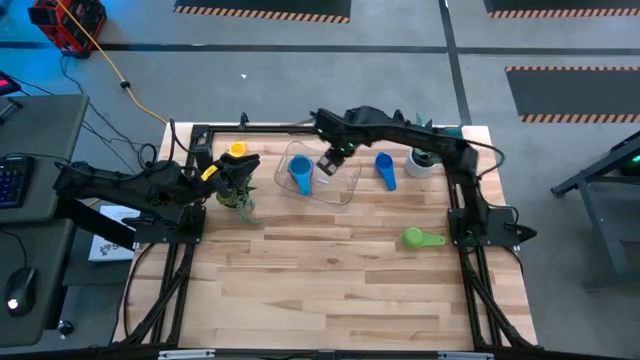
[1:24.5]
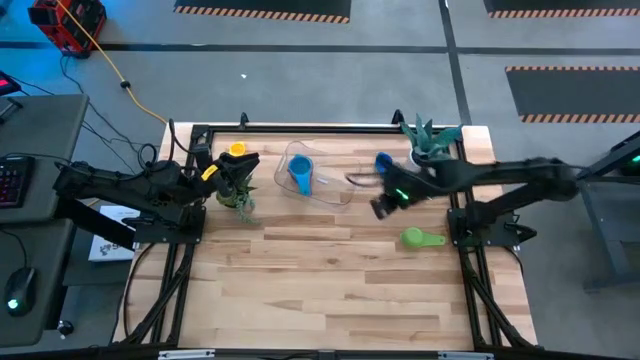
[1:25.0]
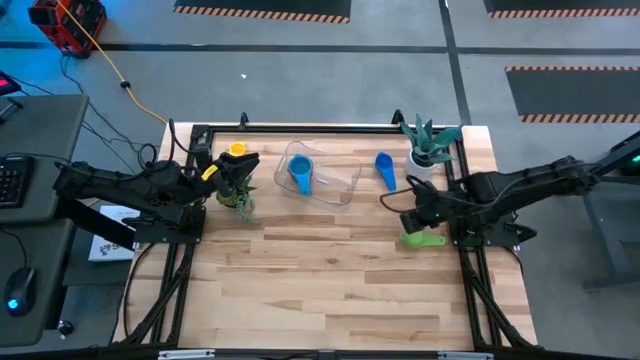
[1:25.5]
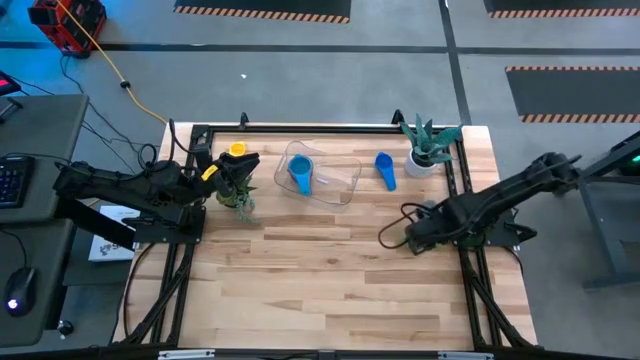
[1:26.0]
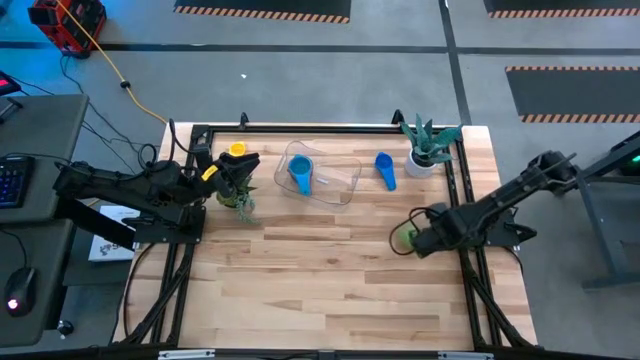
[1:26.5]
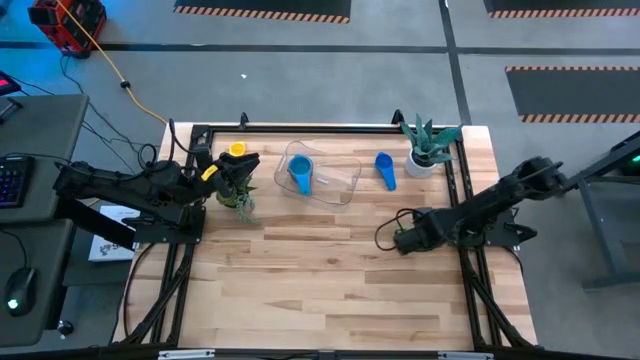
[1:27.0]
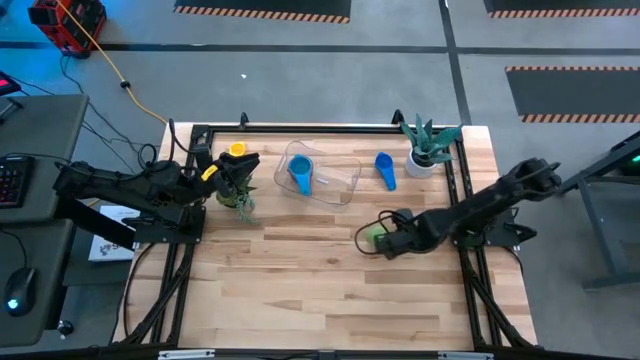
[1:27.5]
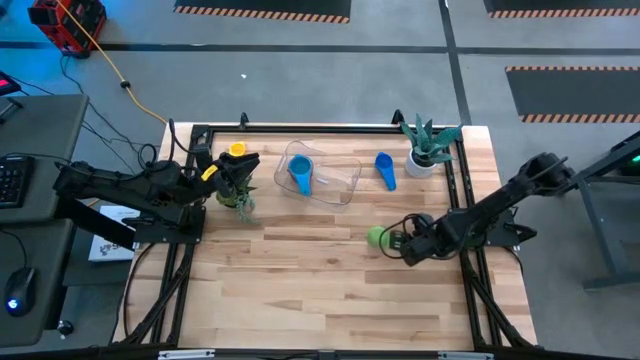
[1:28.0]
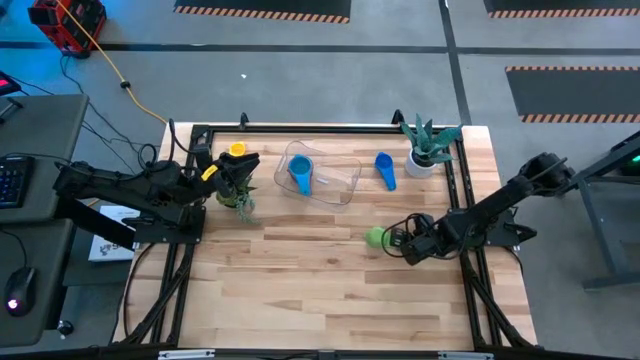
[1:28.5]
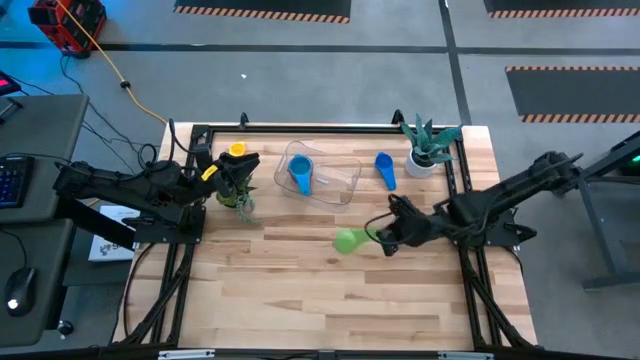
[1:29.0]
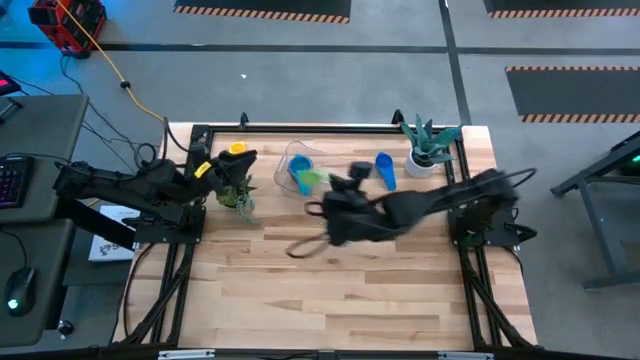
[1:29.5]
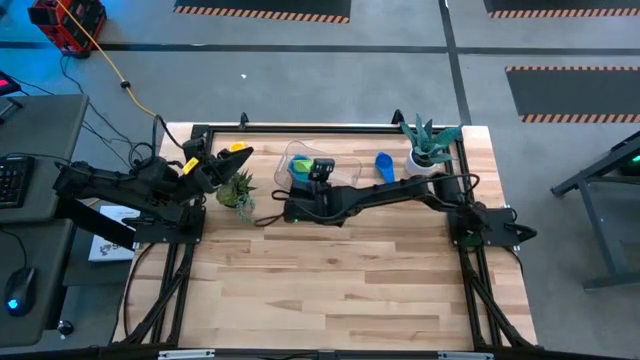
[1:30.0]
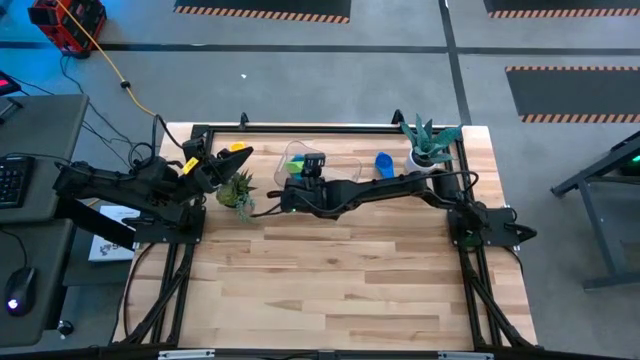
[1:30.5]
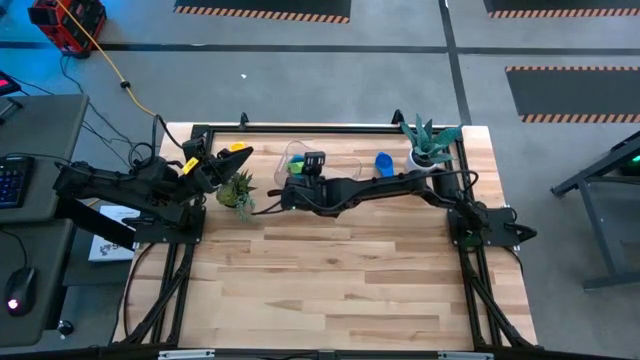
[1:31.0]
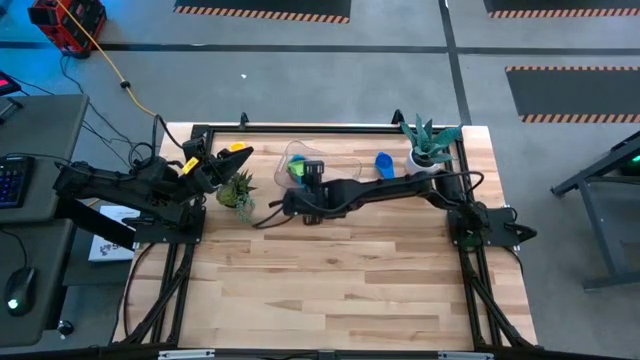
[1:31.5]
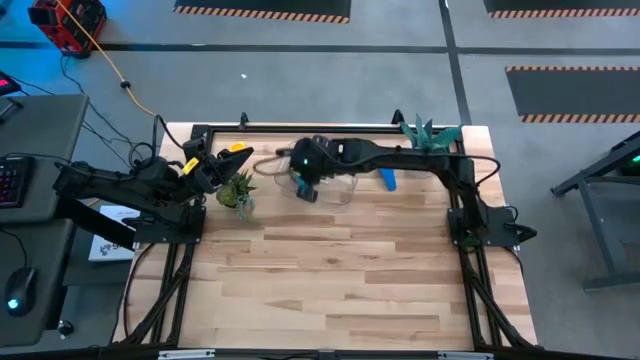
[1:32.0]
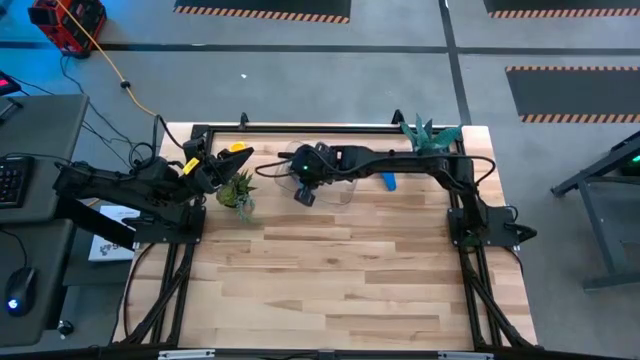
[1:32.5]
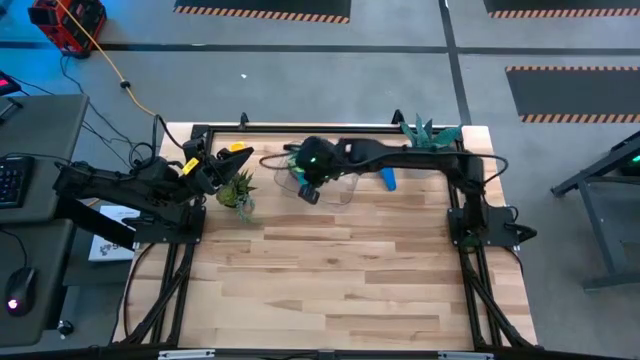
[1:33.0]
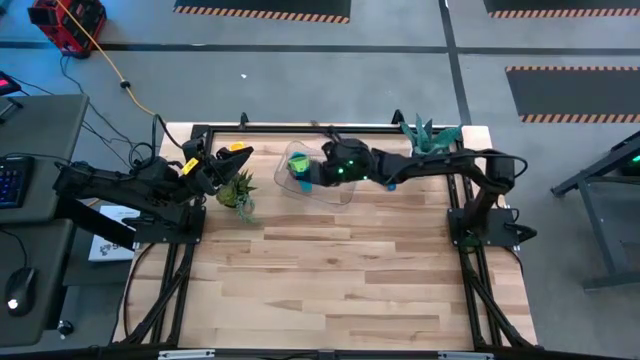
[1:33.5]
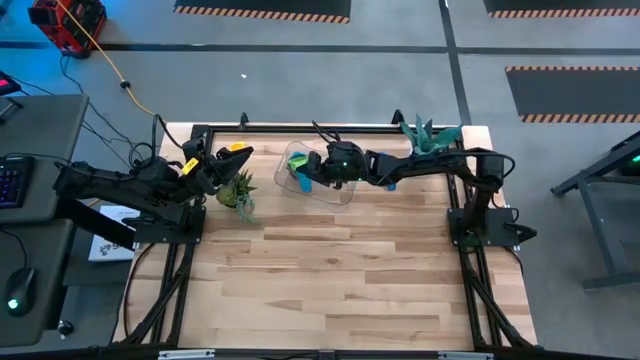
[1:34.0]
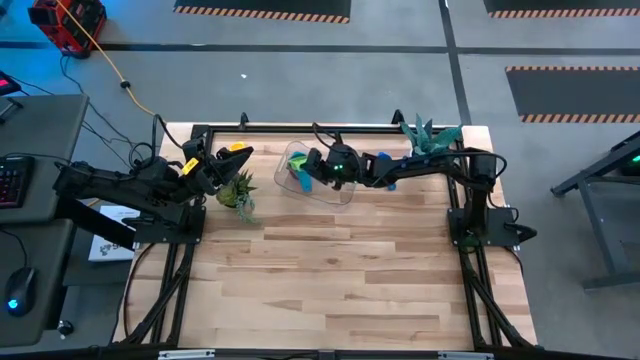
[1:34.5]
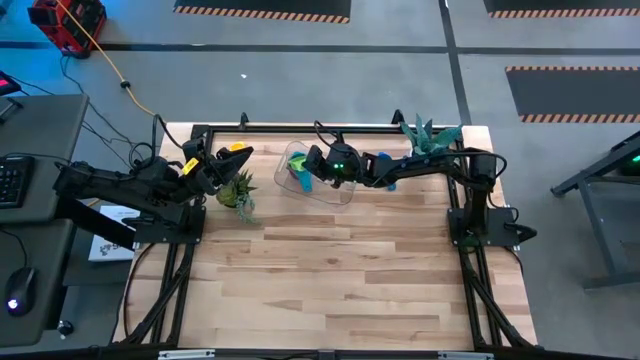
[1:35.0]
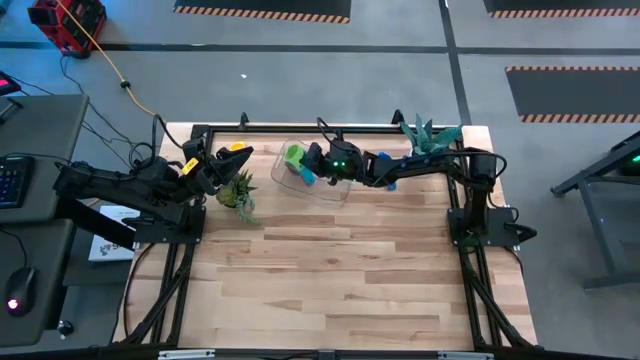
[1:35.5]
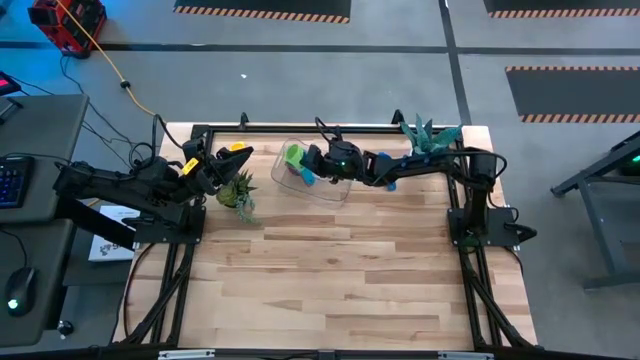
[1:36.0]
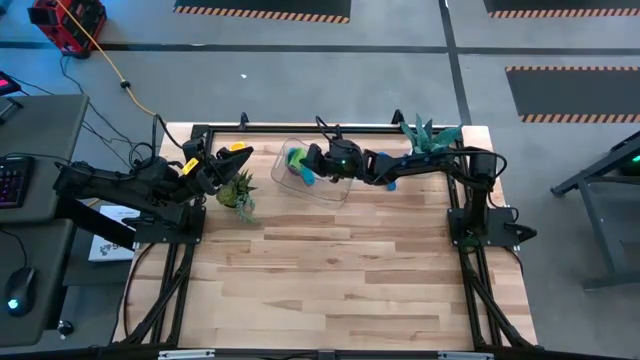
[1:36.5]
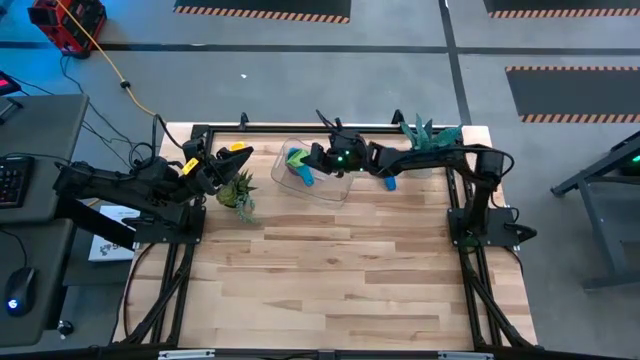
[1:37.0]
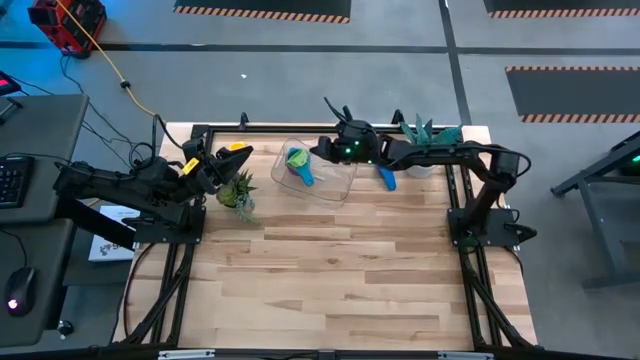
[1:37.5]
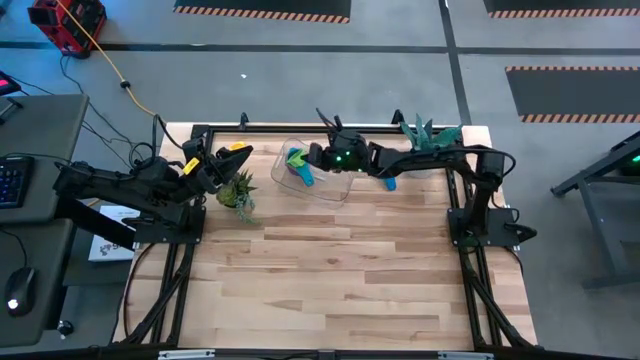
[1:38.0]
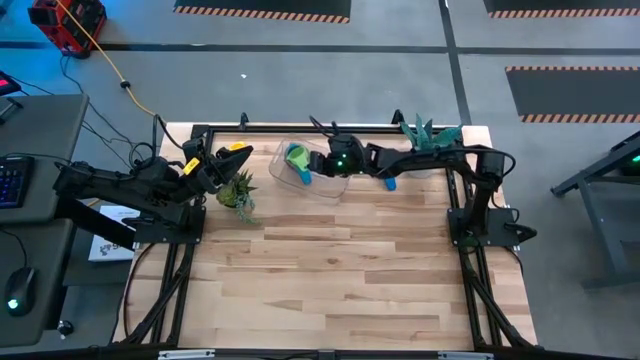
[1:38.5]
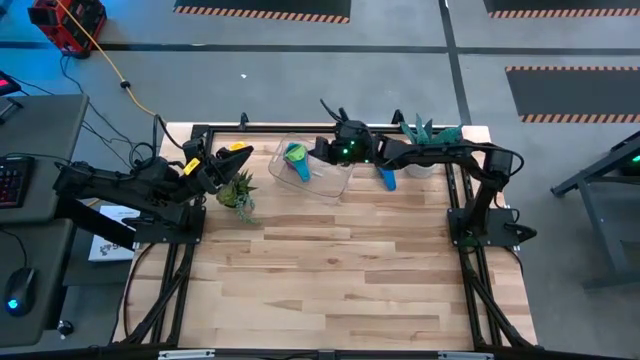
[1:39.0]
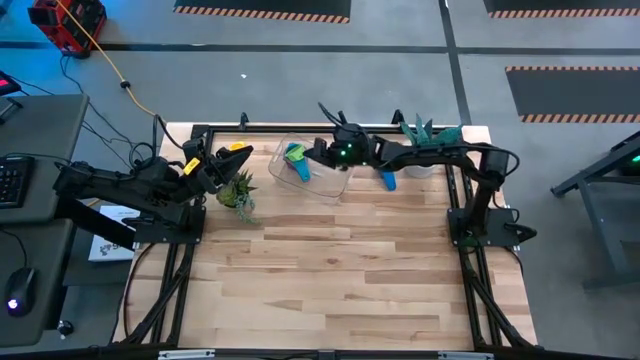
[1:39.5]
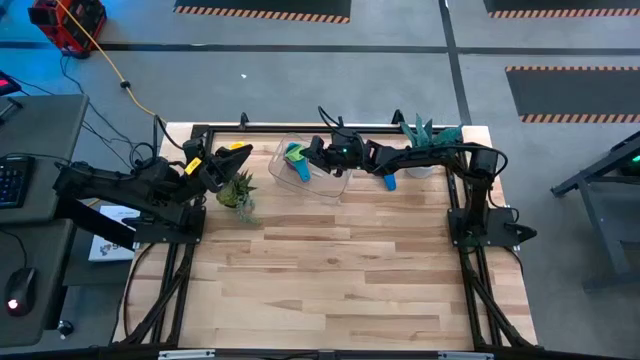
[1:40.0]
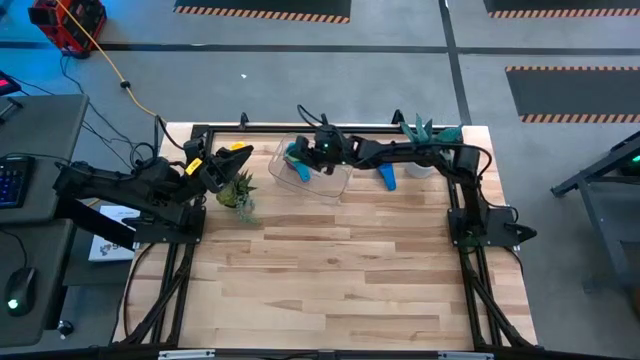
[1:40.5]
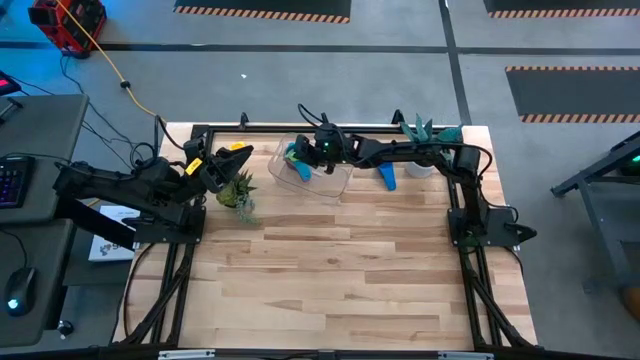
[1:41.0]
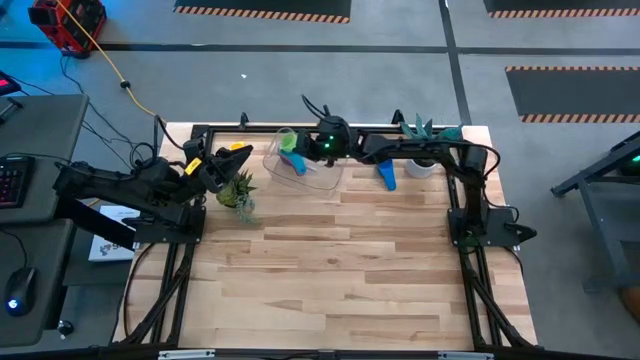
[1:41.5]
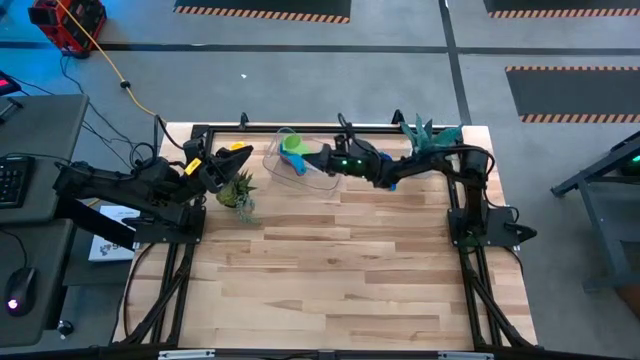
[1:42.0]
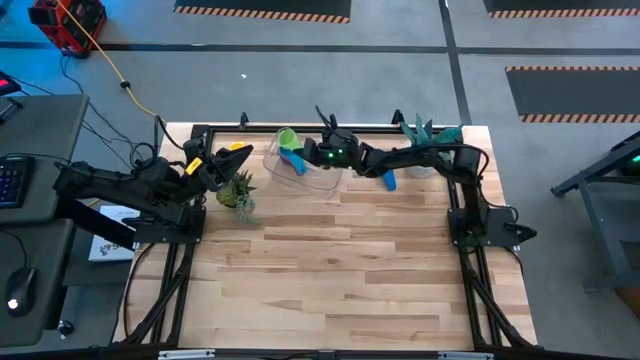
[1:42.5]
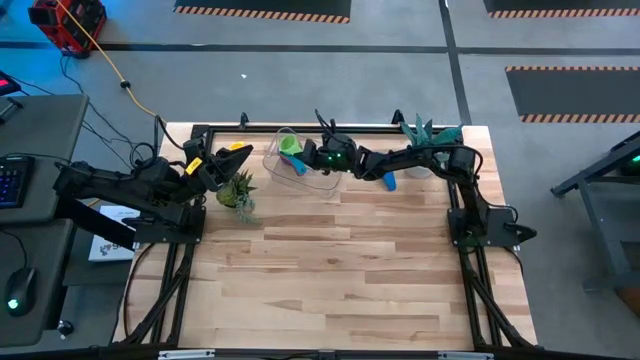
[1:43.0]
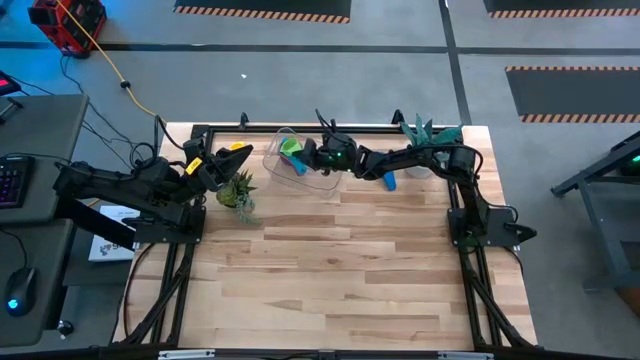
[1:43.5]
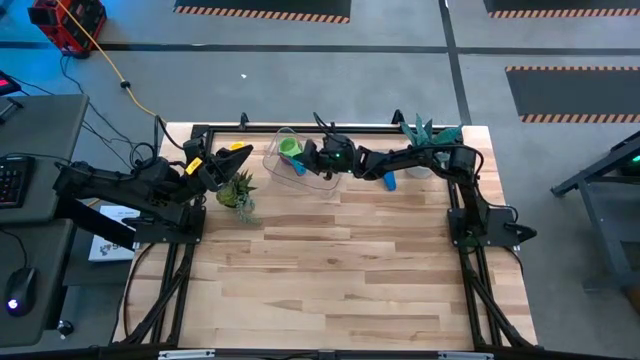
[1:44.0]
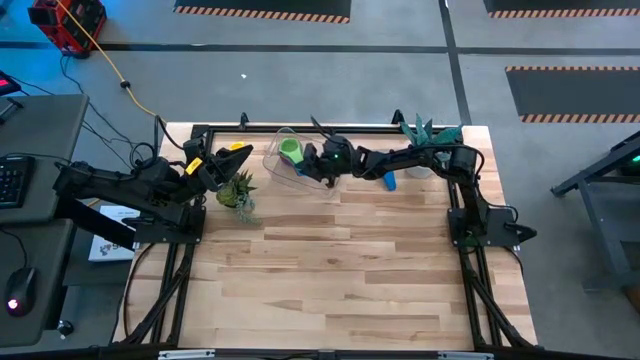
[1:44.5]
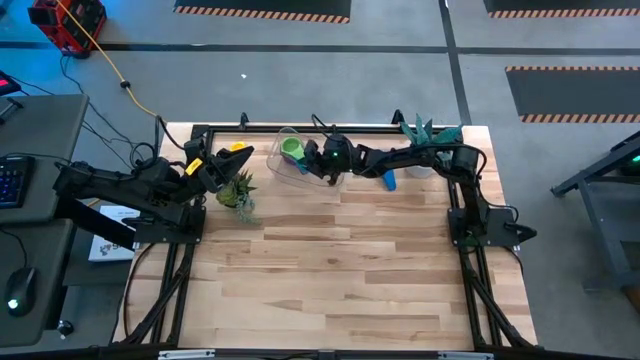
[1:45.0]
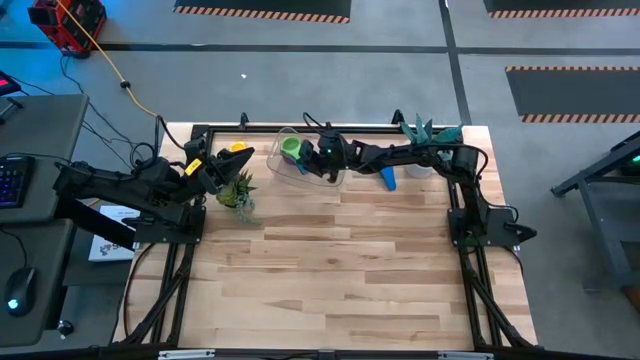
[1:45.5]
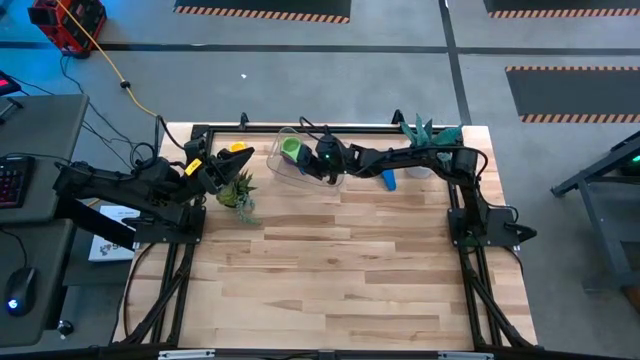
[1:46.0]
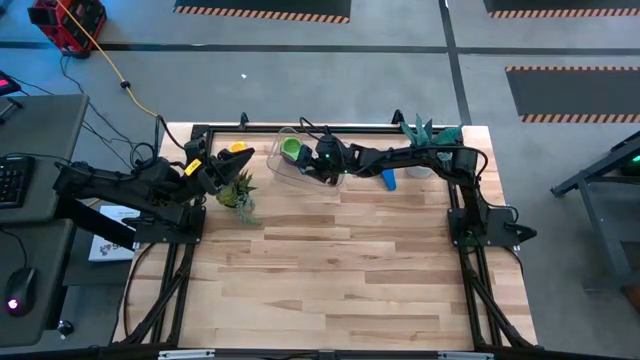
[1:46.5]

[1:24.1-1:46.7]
Task: Nest measuring cups in basket
Stack the green measuring cup on top of the light blue measuring cup on the transparent bin
